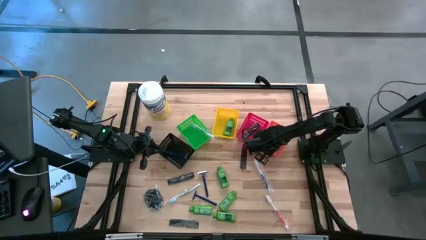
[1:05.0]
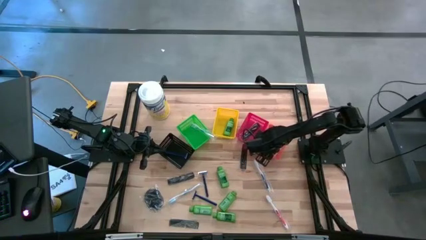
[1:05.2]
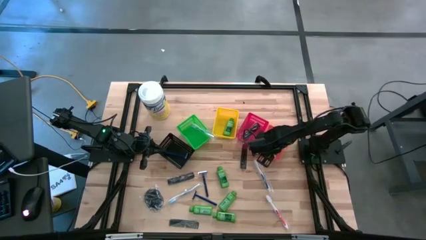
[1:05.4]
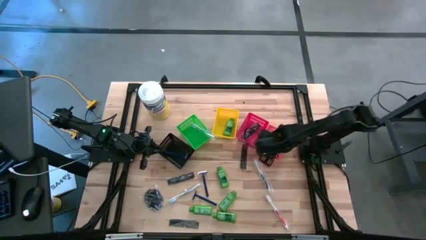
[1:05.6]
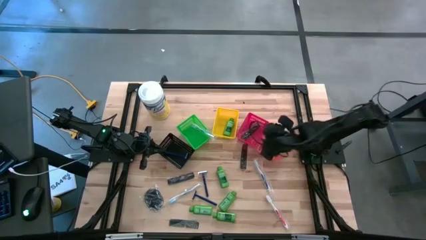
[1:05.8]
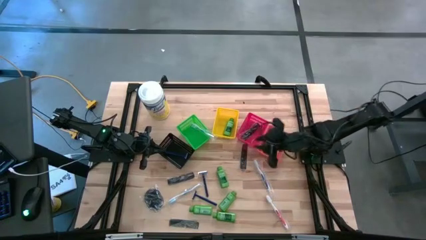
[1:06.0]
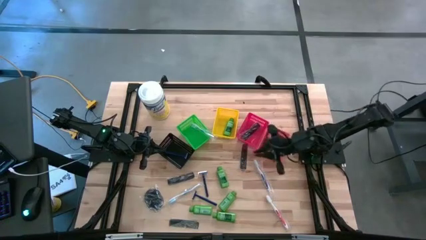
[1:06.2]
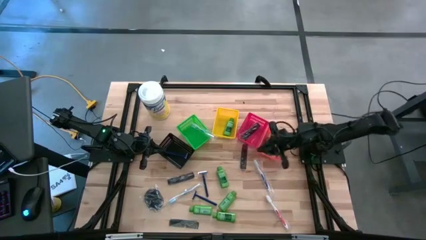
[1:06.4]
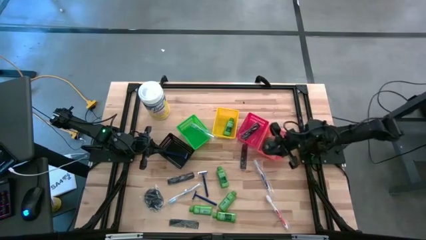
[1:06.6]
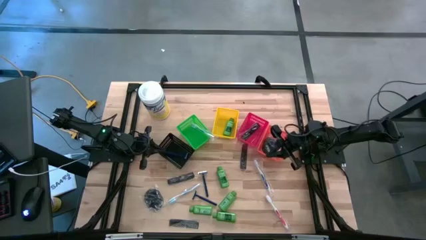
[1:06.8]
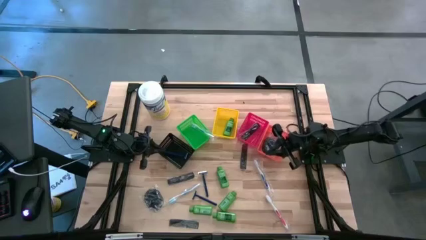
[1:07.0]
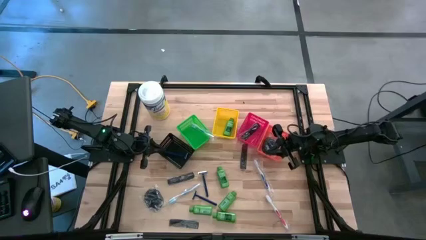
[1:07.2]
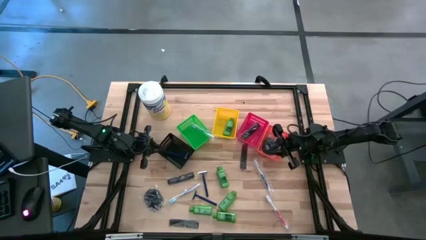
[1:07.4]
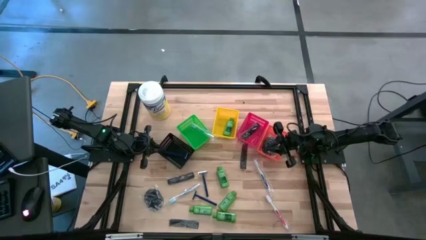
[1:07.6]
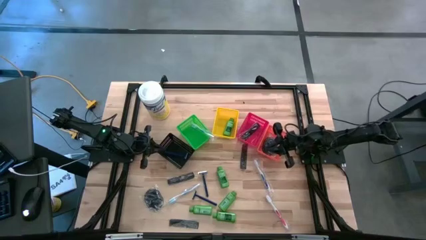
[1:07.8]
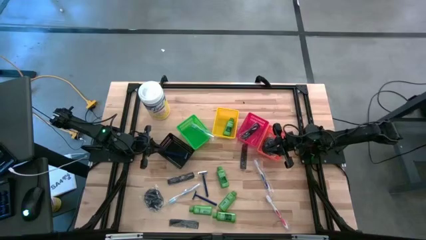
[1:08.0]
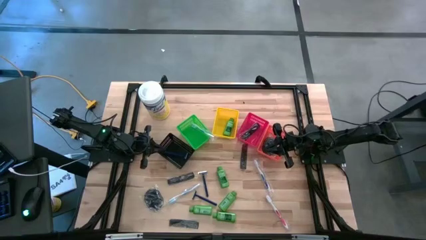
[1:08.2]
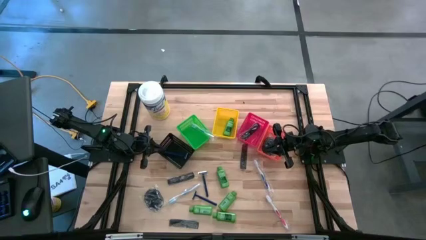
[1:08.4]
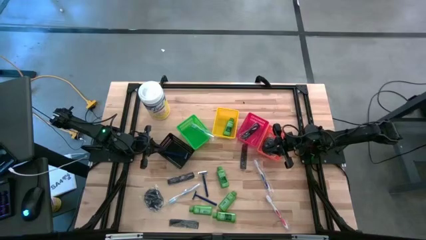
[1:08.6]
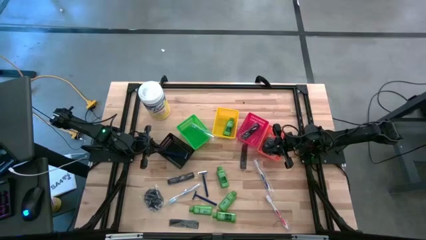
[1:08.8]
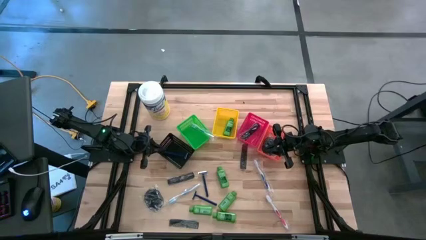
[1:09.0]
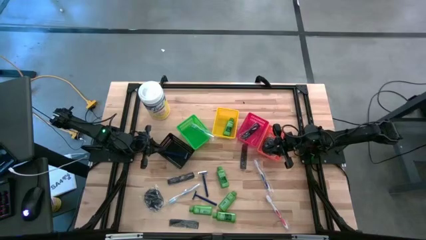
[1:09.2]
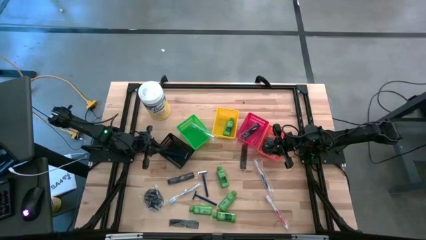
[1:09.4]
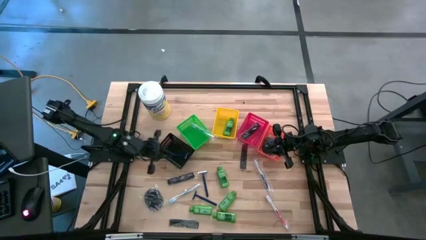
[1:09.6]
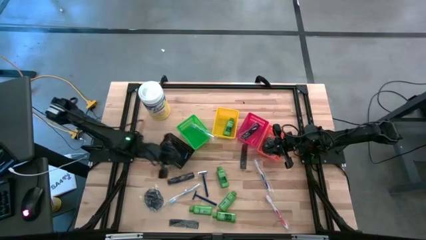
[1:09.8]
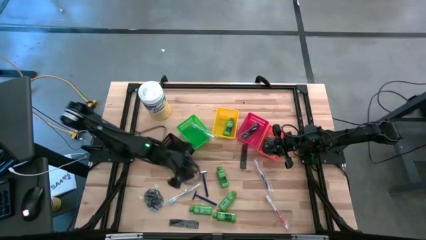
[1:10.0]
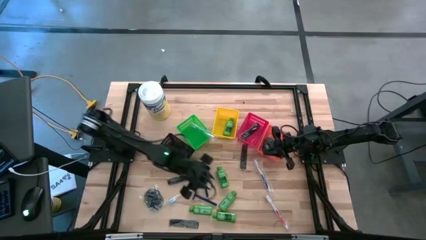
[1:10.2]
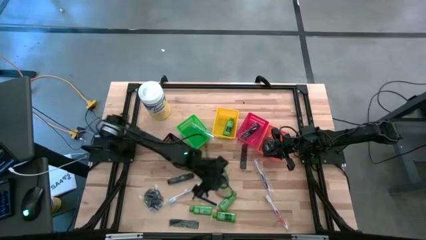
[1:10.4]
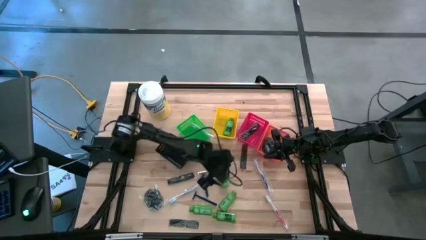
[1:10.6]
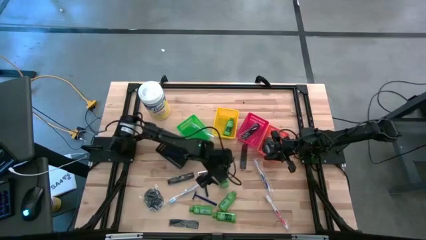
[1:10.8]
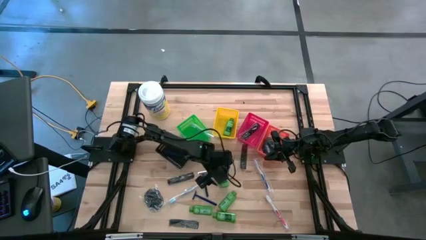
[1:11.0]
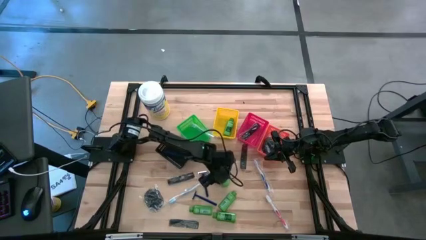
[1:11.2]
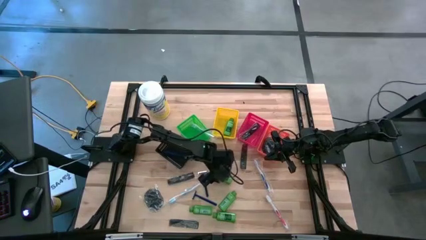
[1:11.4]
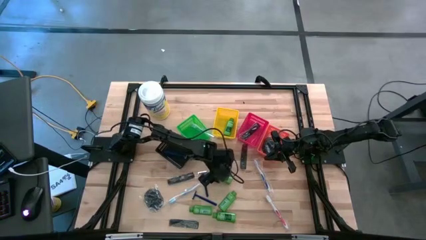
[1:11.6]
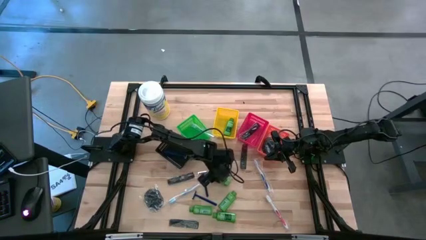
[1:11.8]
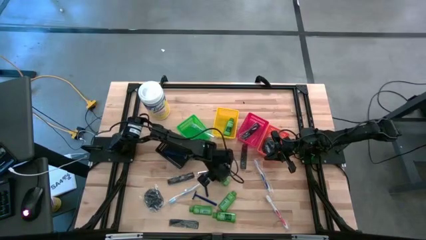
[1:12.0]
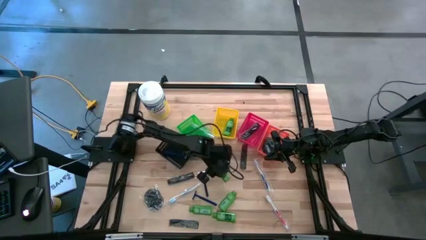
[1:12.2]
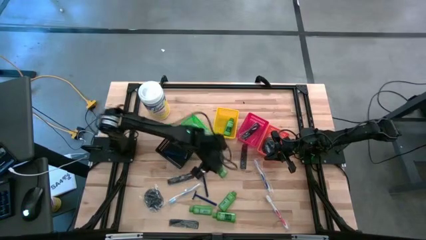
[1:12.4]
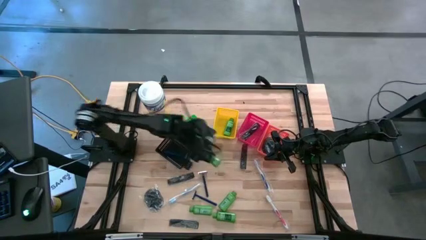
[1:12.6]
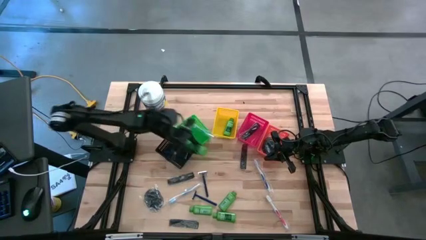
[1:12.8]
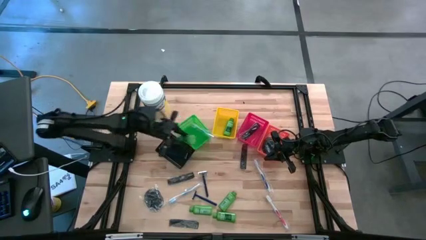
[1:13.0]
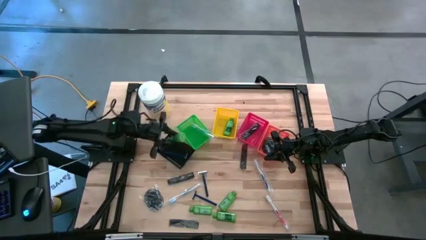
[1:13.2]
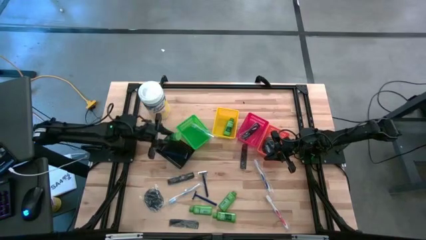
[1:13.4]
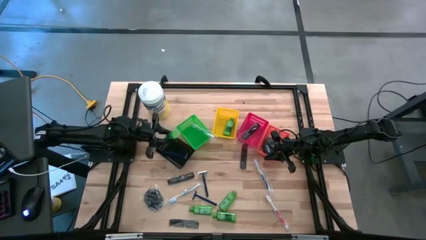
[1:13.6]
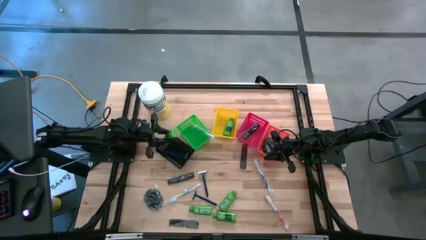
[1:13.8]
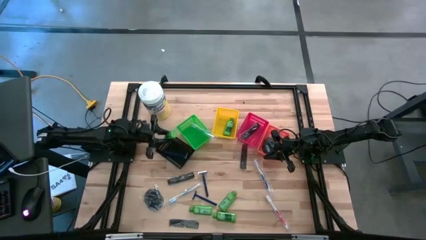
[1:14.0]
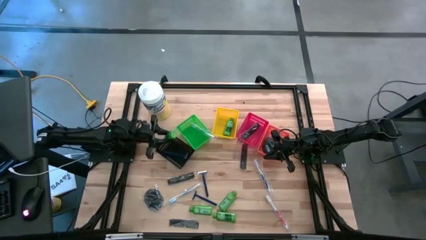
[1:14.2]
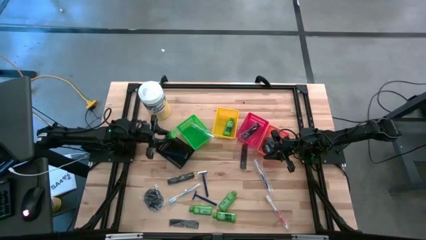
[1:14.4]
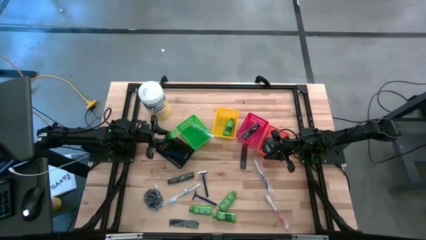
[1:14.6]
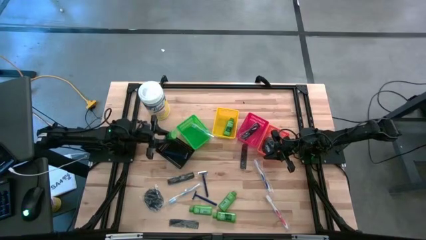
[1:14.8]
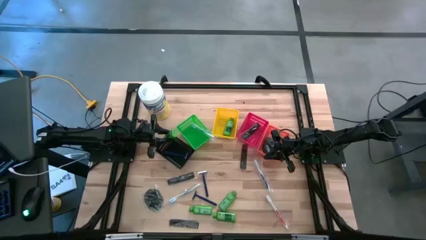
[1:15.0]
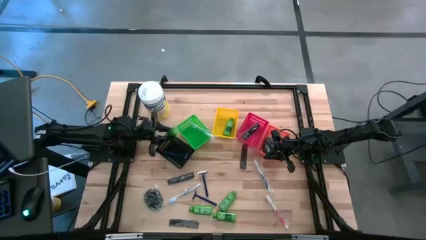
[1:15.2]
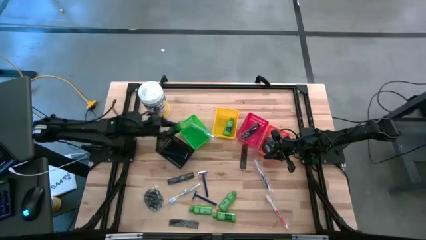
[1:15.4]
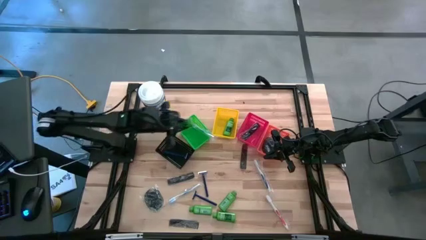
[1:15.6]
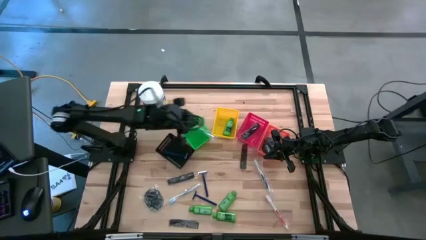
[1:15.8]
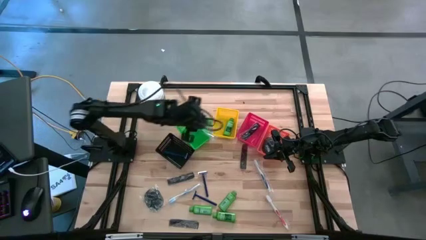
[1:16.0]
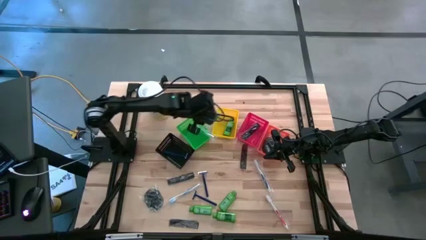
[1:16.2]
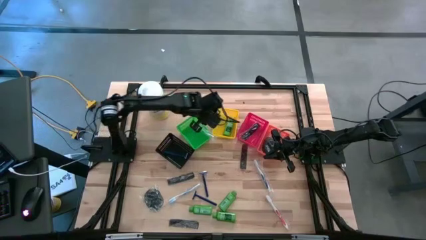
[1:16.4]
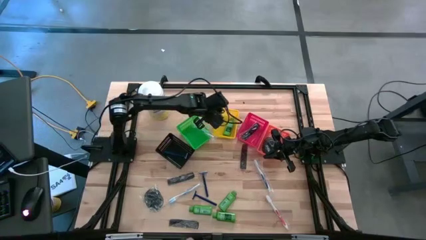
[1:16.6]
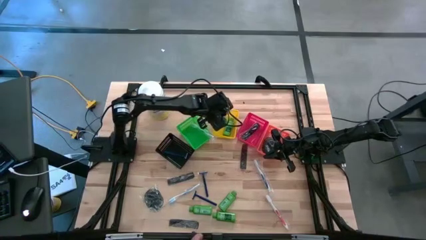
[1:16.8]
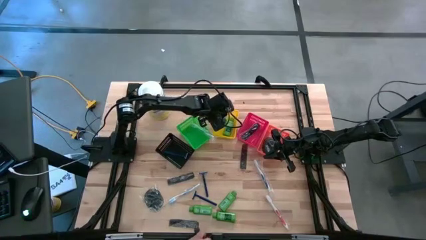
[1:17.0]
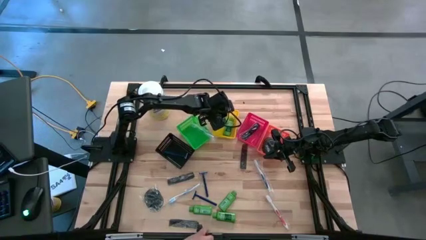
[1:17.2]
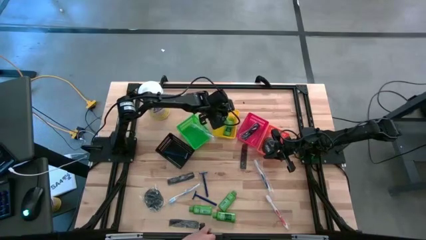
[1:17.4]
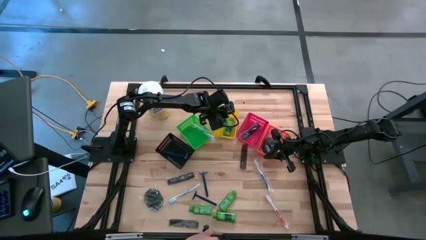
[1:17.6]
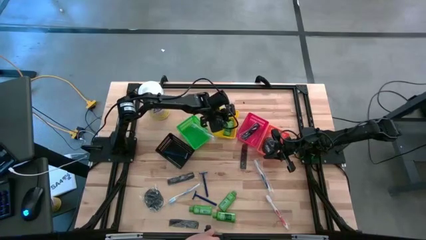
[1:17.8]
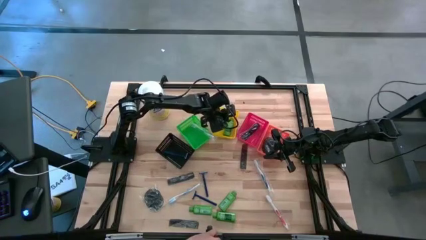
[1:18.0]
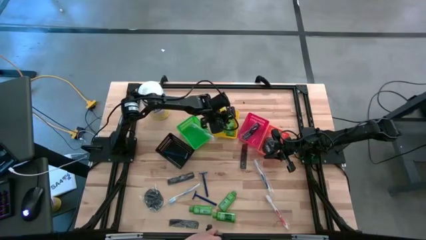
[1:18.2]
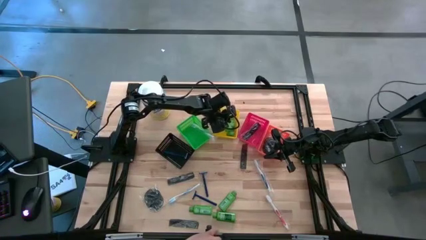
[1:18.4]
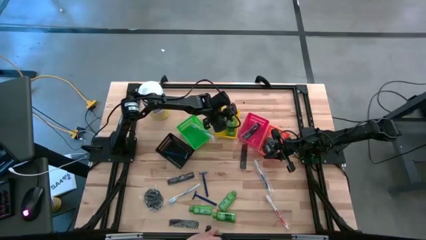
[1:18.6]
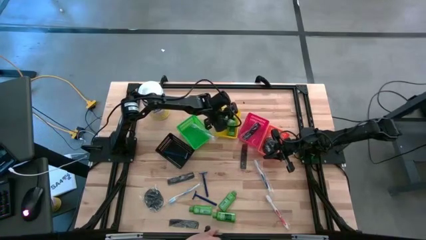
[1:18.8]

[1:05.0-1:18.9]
Task: Pick & Place Travel size toiletries
Put the green shampoo into the yellow bin

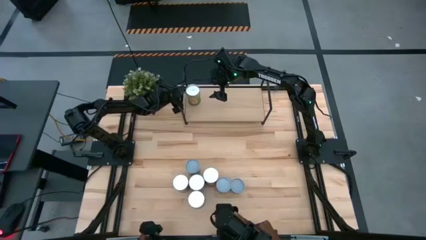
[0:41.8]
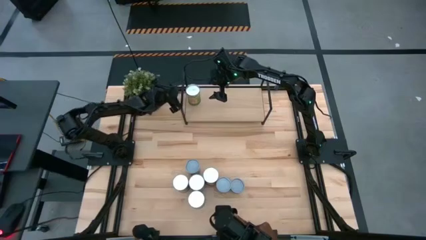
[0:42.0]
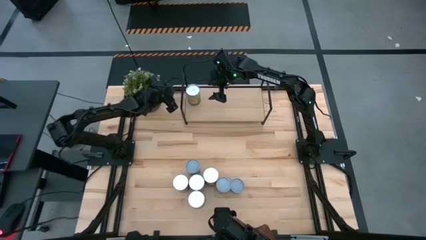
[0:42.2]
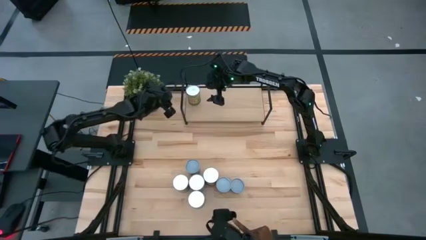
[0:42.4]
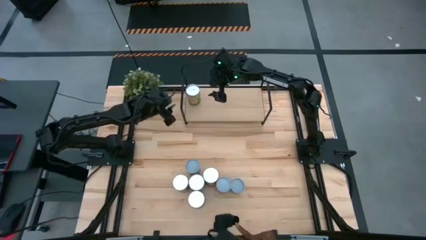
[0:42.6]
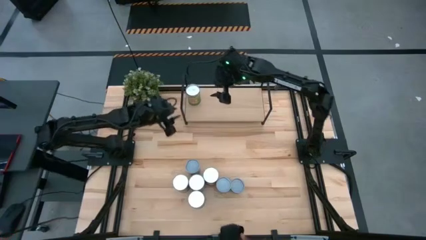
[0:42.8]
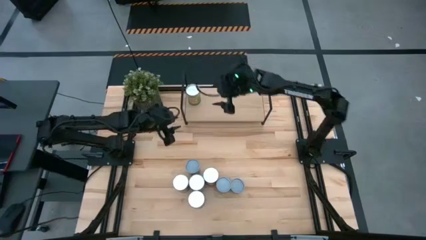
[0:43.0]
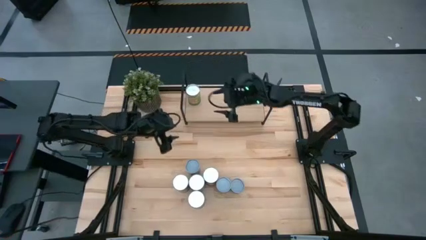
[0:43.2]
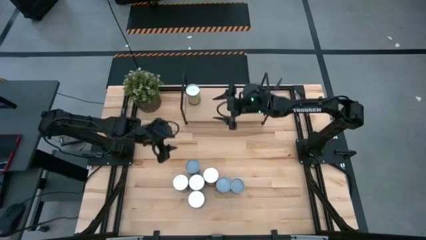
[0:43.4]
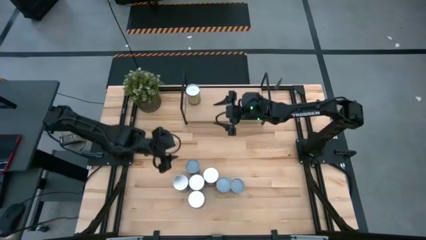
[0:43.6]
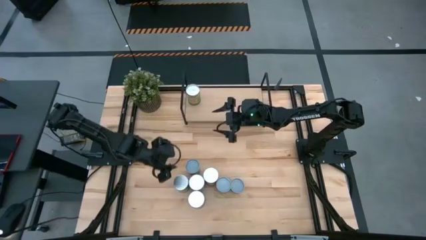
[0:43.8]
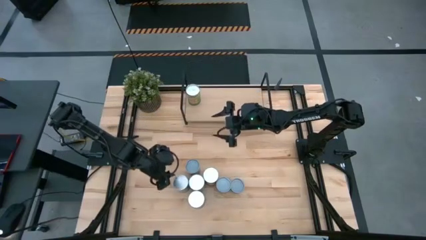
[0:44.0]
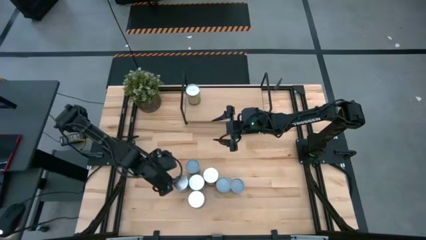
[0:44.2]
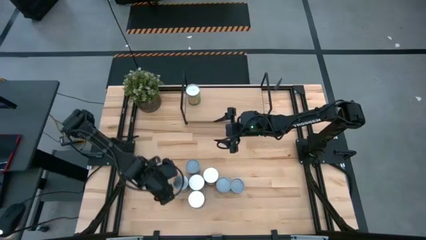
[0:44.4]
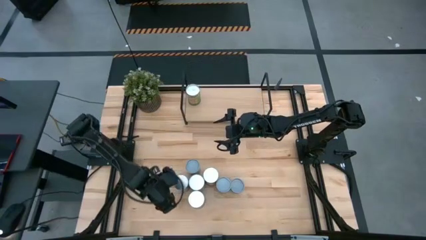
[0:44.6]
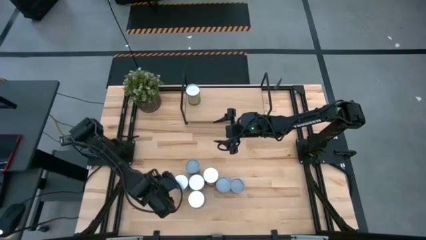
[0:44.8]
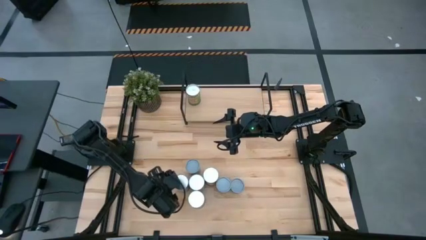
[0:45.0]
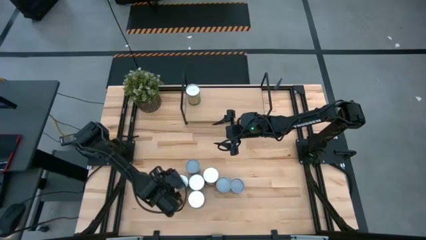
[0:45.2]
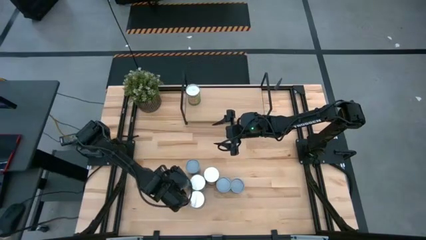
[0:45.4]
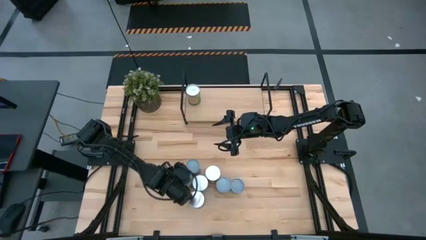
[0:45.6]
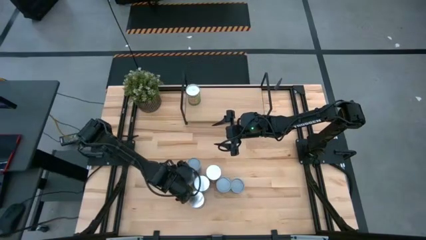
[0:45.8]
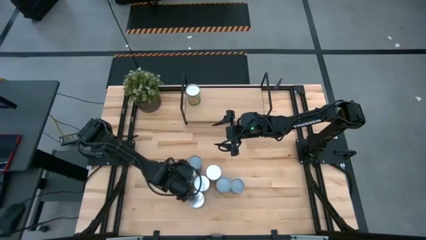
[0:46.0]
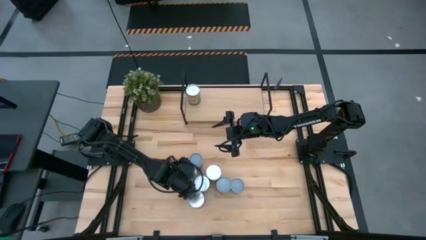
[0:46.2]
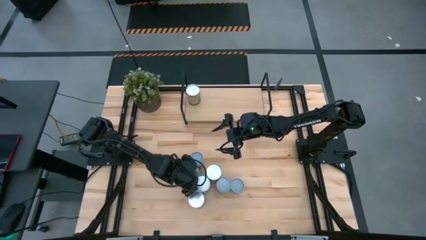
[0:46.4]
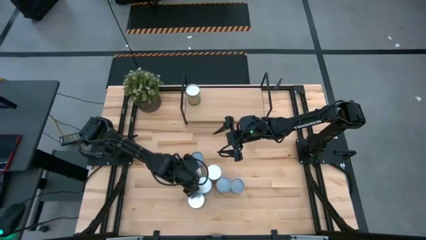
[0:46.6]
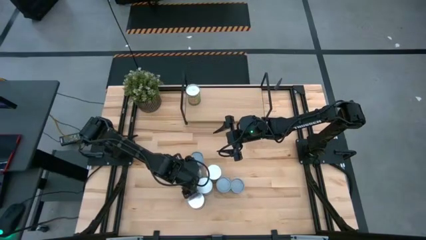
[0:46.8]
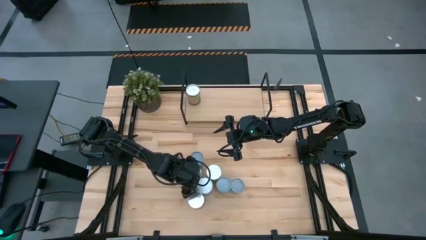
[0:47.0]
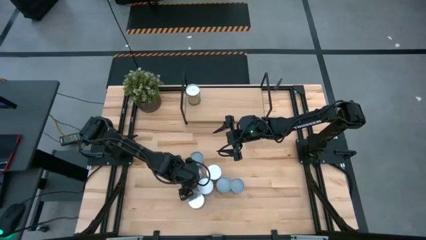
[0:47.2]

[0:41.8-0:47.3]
Task: Pick and place cans onto a shelf
Adjust the canned pineapple
